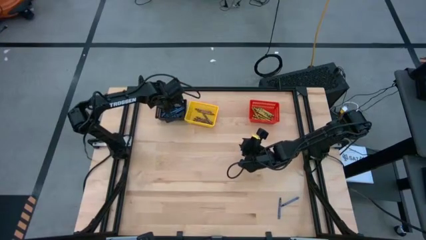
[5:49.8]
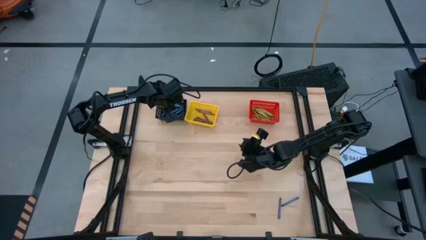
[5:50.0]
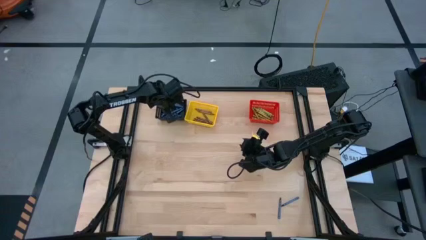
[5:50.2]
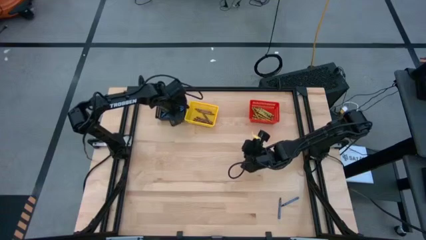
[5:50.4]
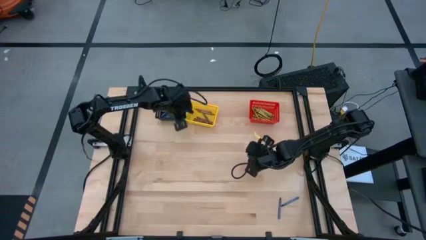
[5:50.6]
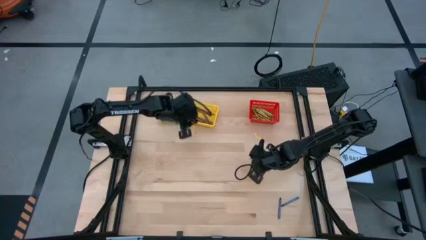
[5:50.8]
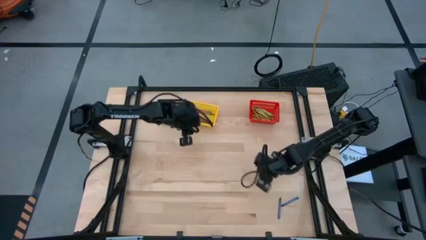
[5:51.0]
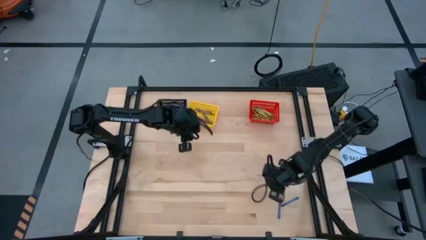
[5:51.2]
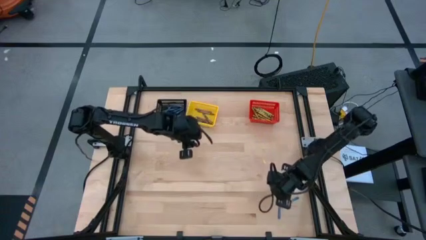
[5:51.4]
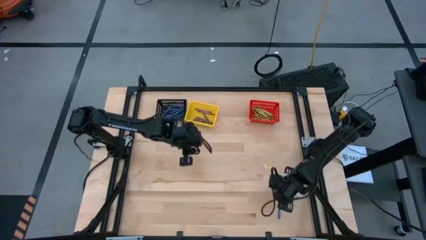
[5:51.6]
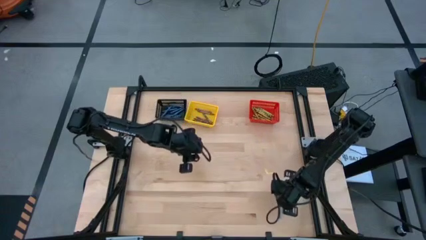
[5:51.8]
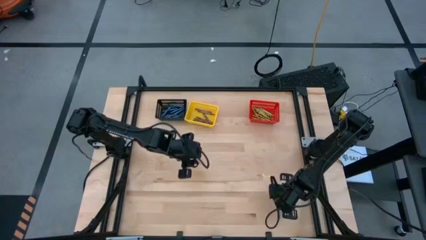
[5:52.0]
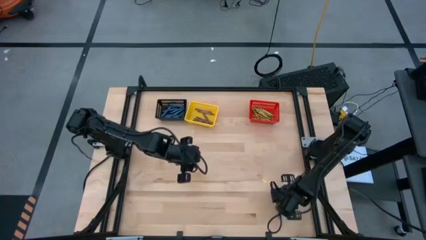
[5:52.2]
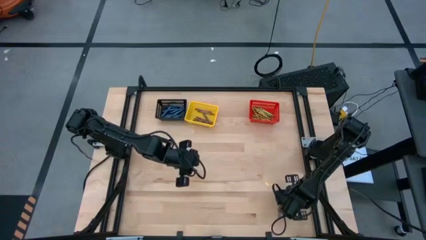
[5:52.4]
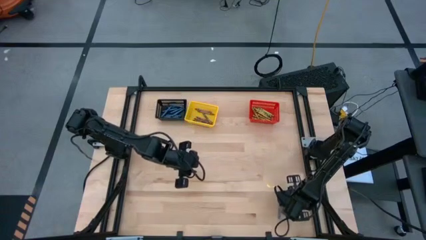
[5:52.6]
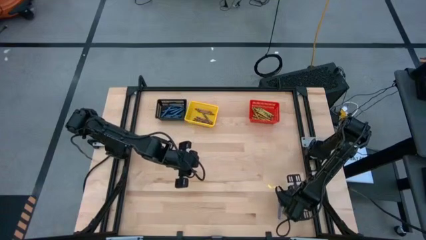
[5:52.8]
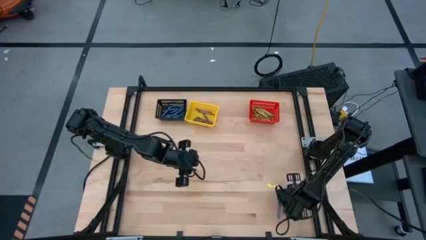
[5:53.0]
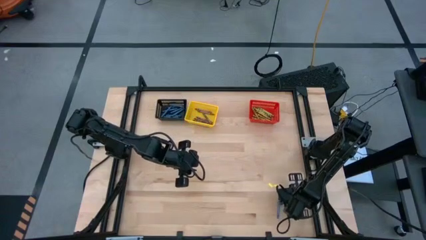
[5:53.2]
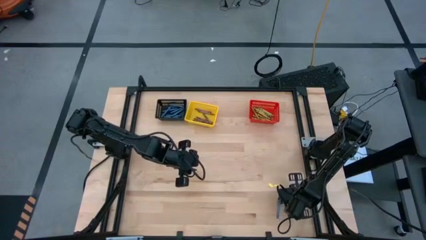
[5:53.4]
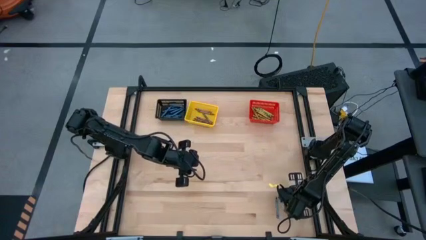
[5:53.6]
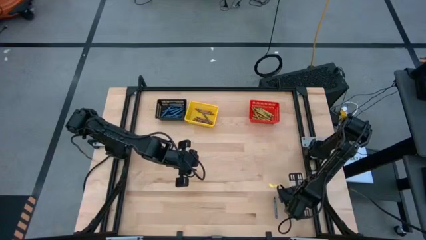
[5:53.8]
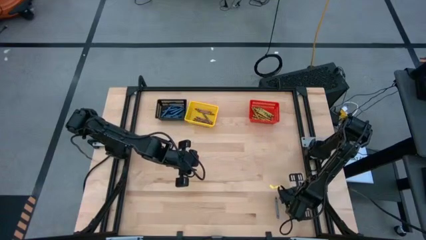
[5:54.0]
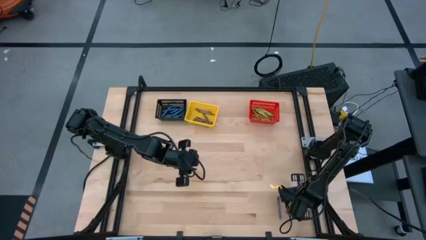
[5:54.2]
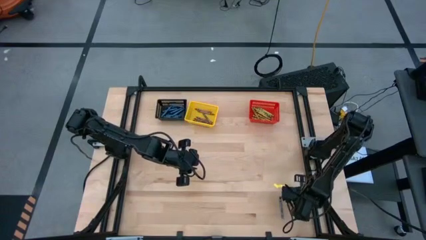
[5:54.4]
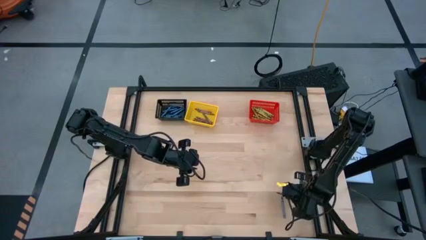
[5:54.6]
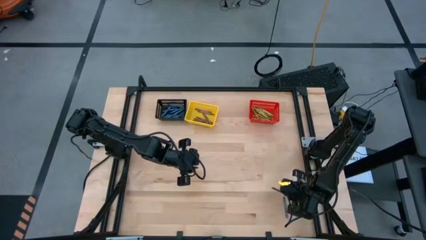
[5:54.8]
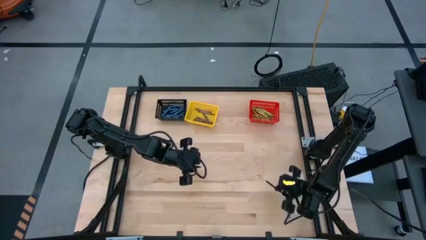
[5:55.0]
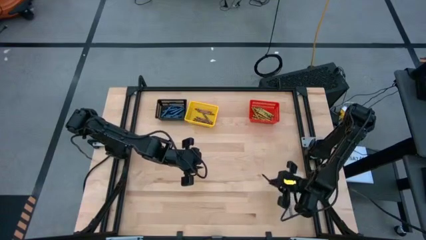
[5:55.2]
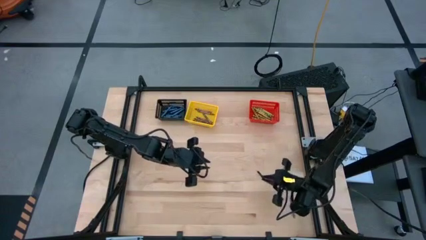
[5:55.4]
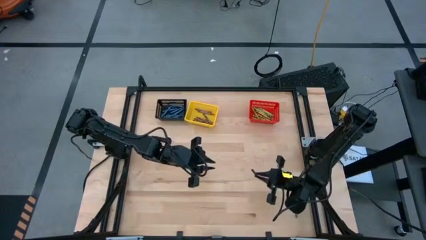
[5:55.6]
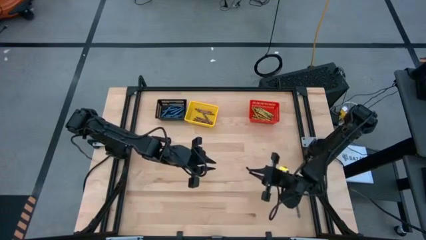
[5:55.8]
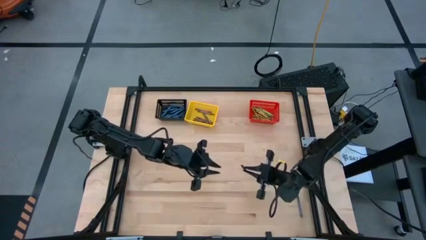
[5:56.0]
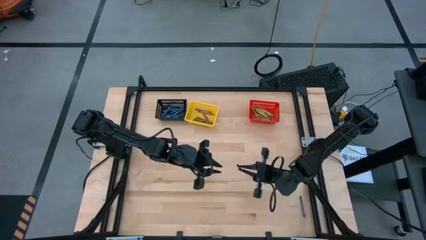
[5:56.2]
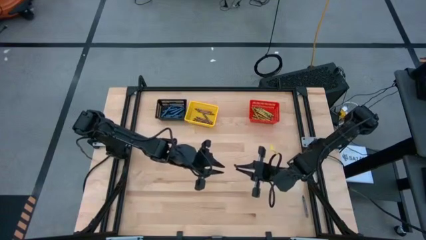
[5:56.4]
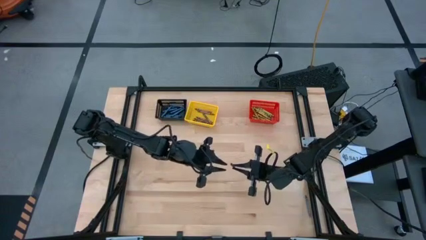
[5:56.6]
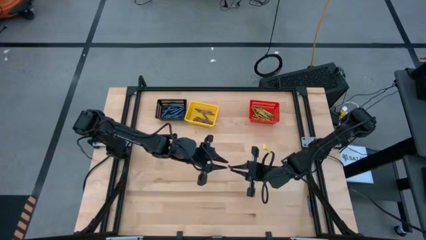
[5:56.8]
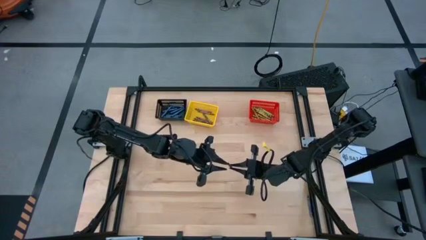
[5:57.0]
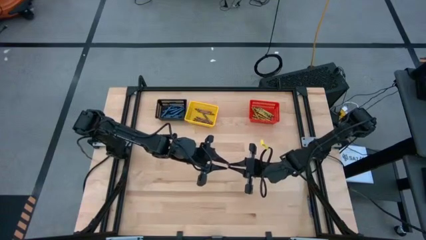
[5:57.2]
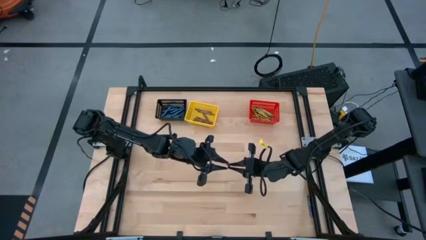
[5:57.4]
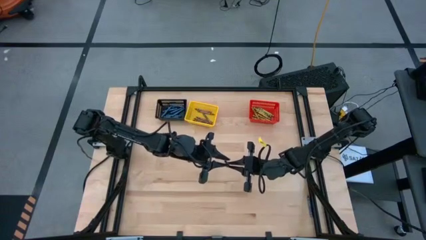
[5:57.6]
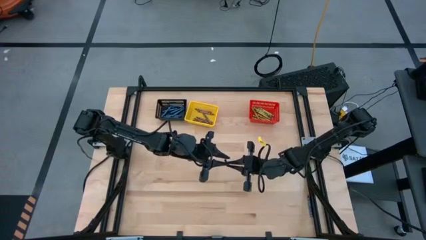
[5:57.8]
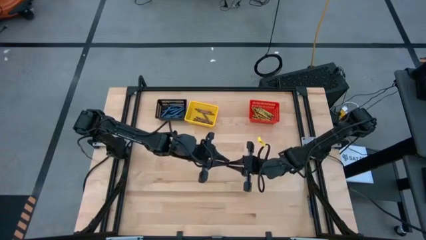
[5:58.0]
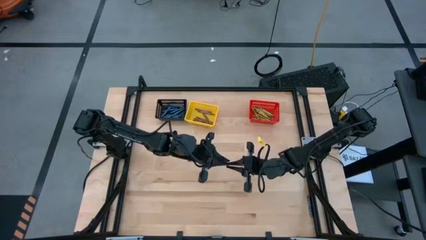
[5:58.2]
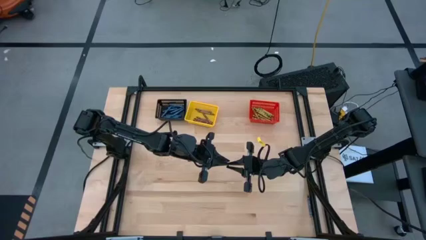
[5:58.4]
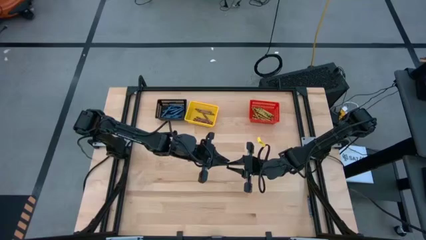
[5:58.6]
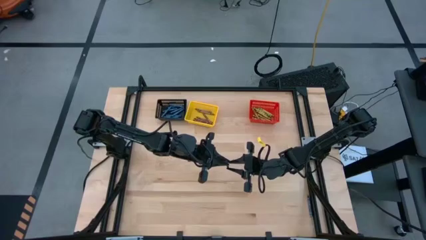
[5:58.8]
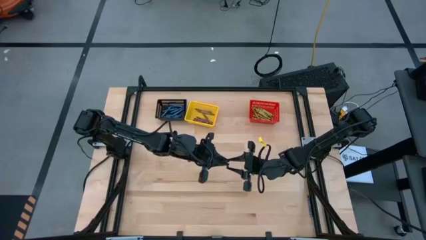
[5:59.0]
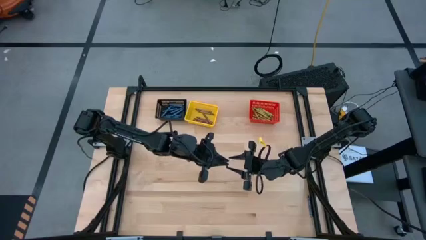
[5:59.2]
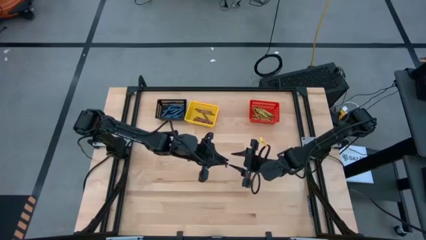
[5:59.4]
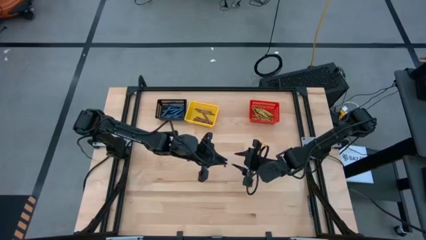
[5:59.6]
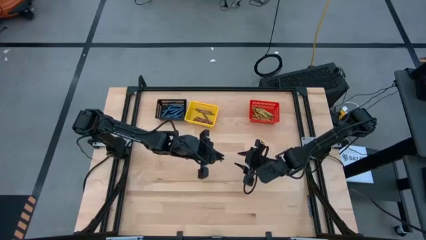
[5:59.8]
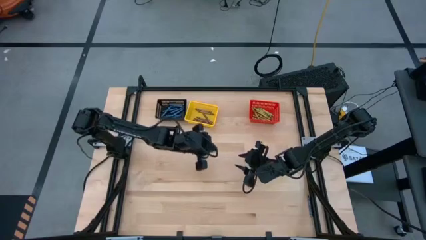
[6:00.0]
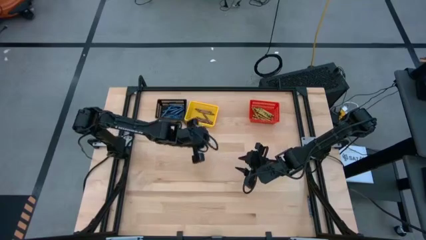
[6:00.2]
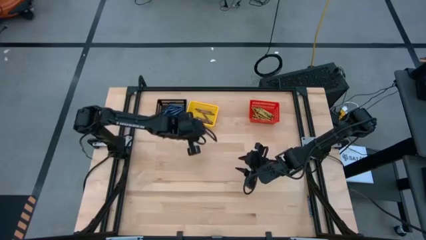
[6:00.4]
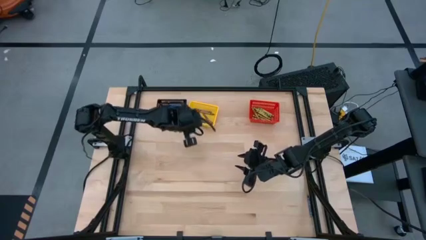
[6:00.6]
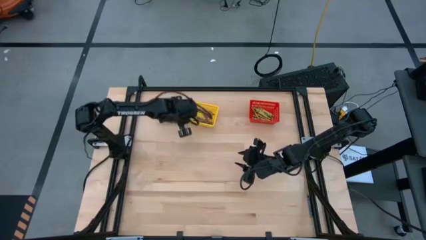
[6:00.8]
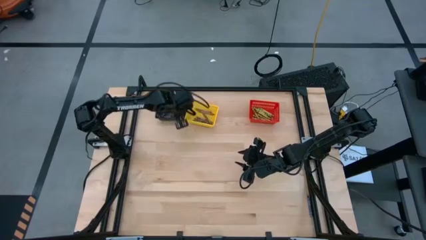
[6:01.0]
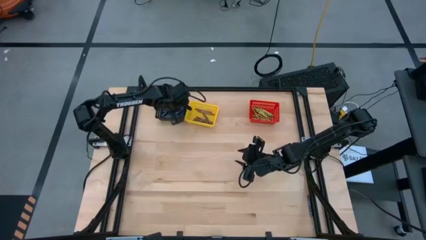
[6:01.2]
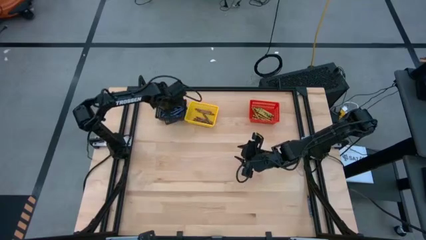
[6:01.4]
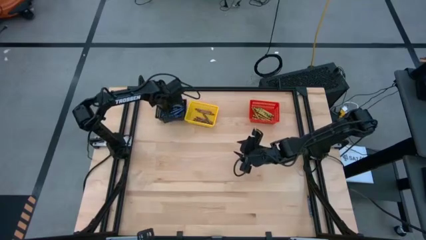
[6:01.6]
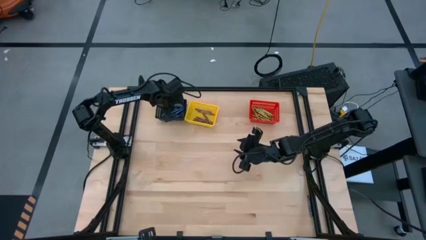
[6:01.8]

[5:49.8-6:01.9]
Task: Sort crayons
Put the right blue crayon into the black bin

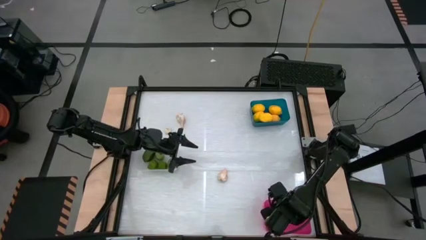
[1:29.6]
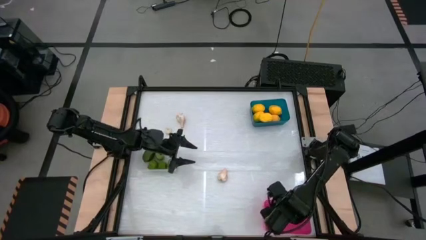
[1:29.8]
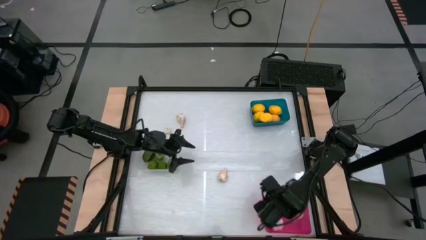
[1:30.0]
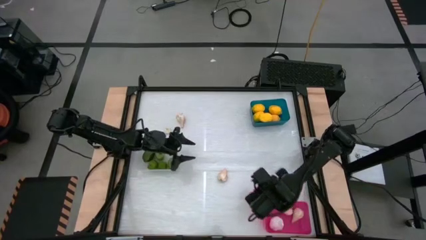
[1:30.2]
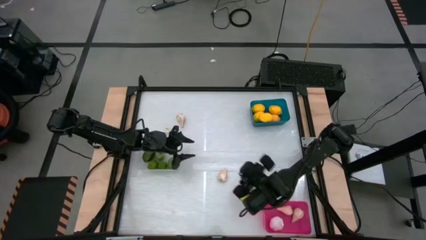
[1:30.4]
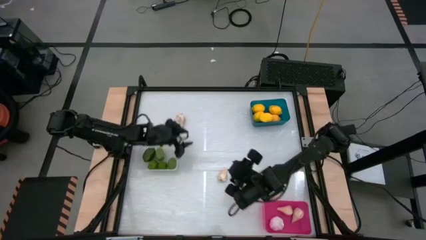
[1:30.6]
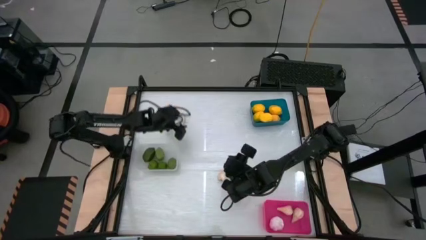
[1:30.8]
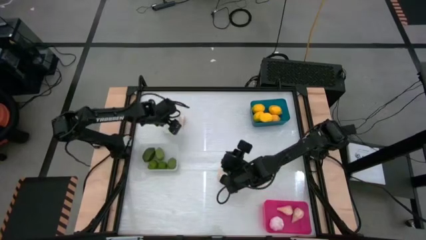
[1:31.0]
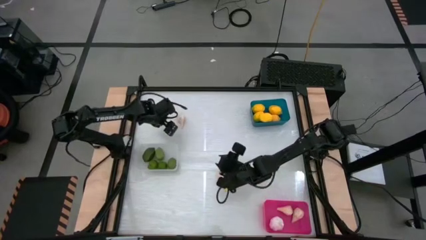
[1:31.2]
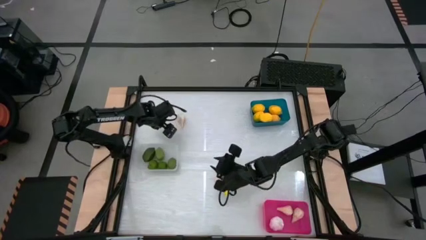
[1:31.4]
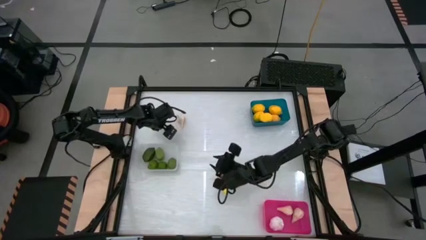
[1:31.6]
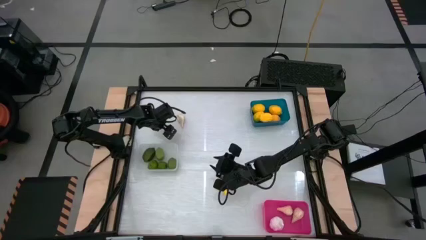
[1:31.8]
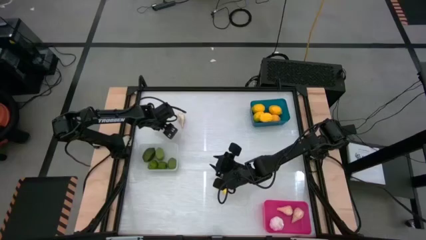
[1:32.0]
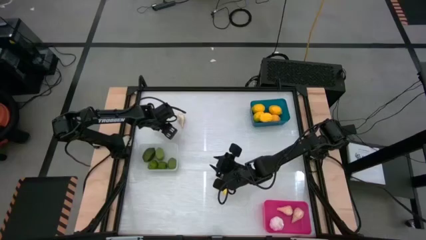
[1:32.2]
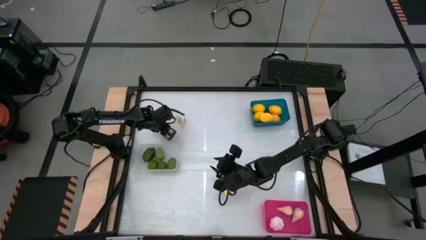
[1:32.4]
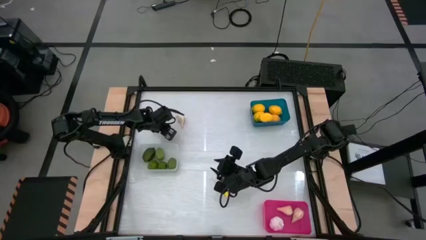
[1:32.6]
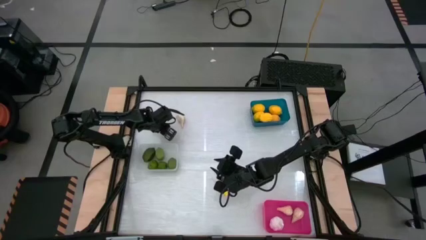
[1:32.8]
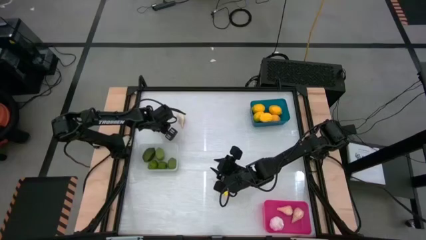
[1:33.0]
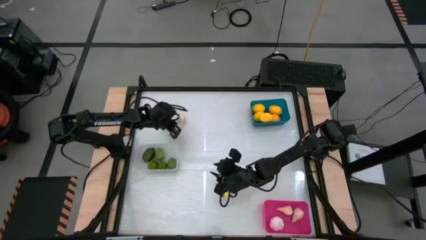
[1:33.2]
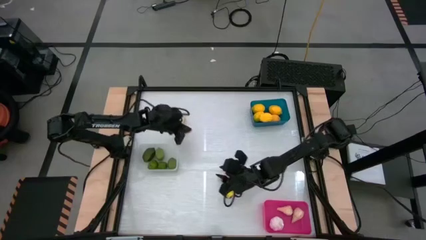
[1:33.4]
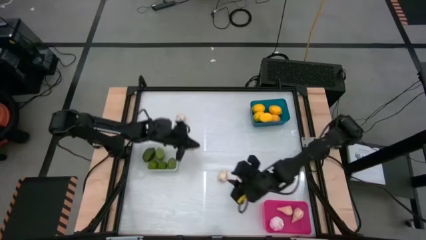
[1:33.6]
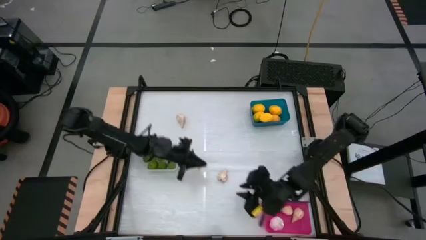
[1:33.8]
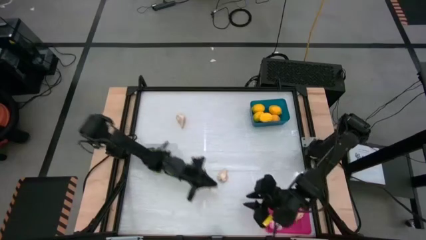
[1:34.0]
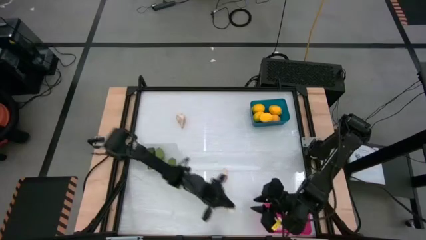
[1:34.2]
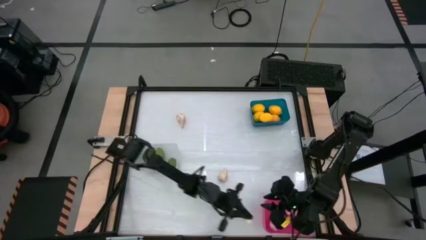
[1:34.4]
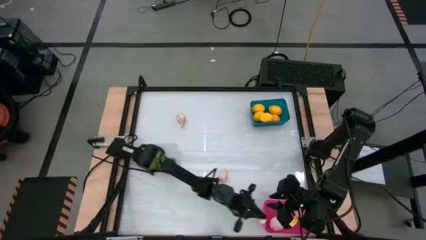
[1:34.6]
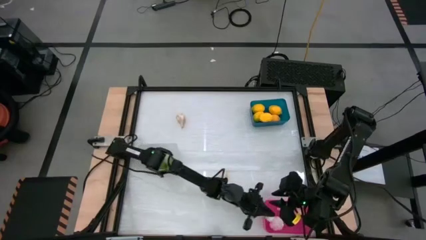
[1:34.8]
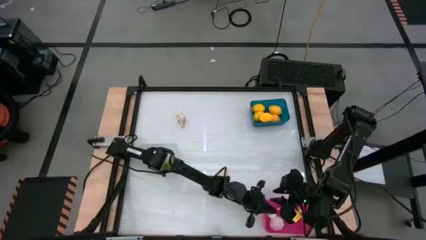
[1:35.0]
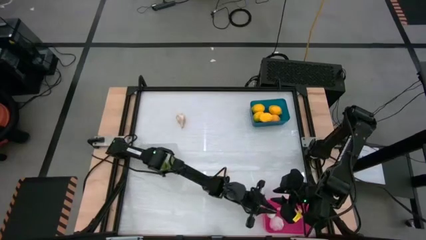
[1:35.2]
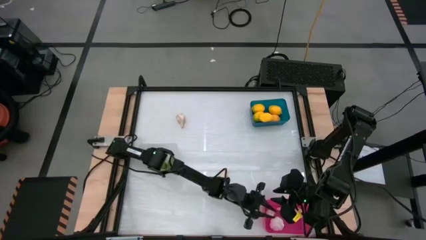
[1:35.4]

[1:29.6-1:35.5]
Task: Sort produce into baskets
Put the white garlic into the pink bin
